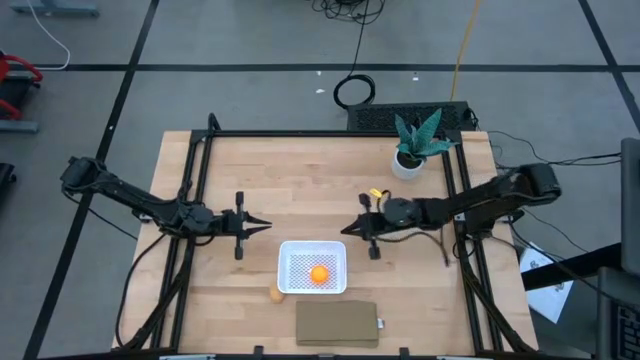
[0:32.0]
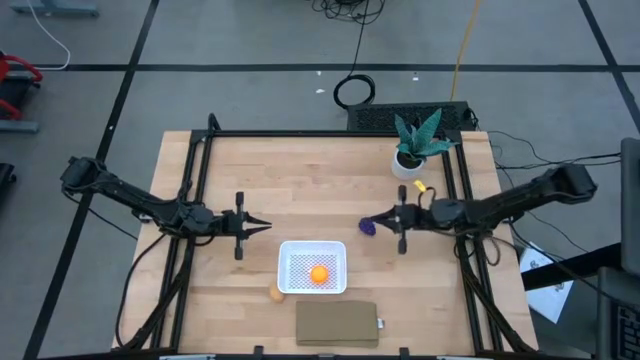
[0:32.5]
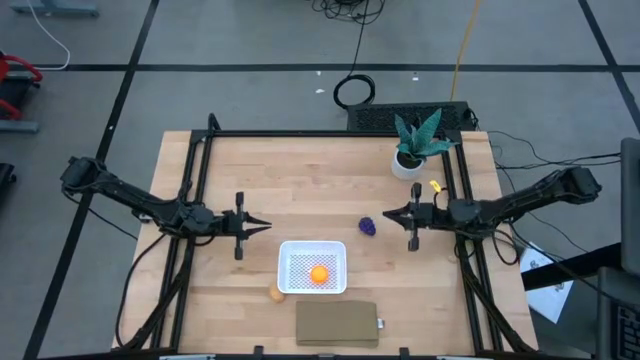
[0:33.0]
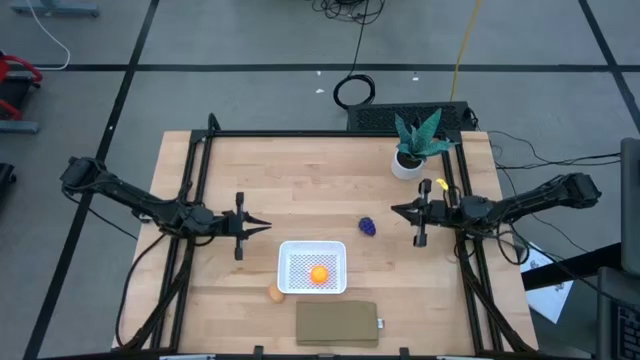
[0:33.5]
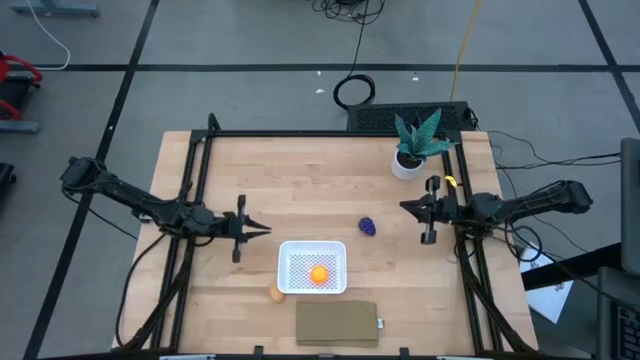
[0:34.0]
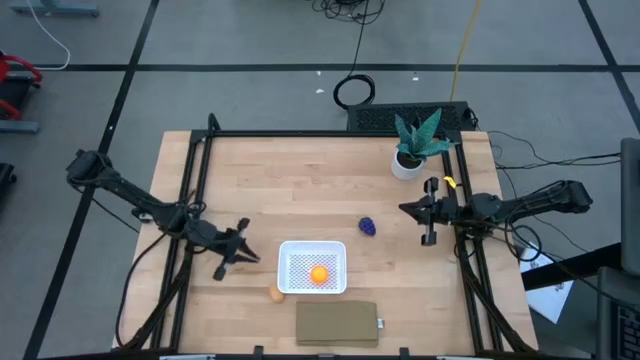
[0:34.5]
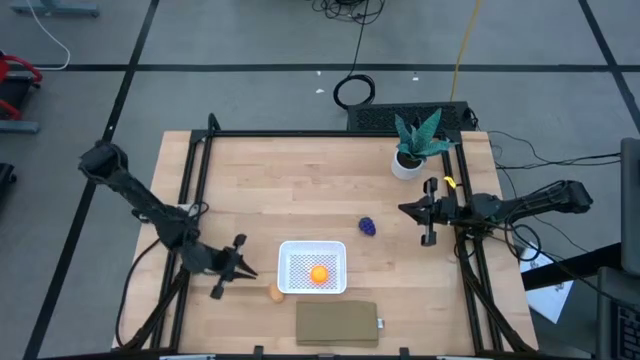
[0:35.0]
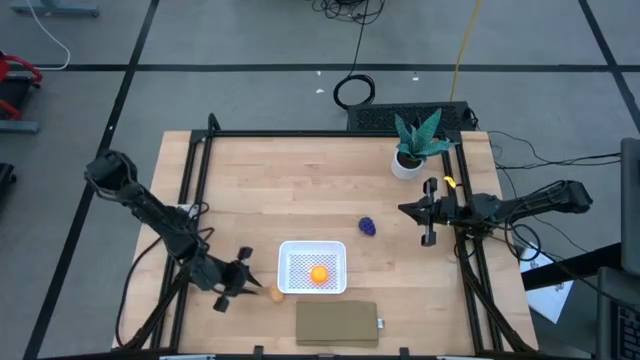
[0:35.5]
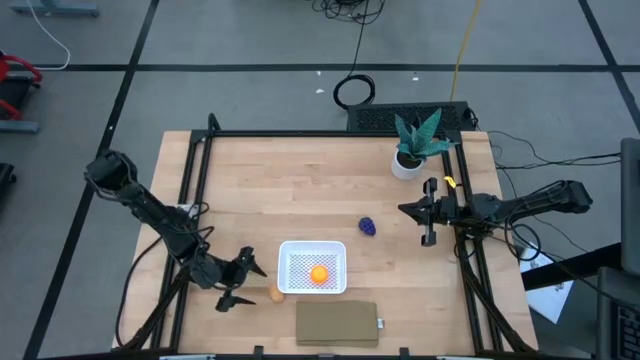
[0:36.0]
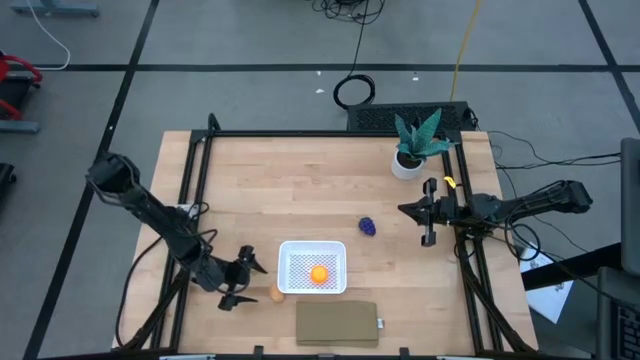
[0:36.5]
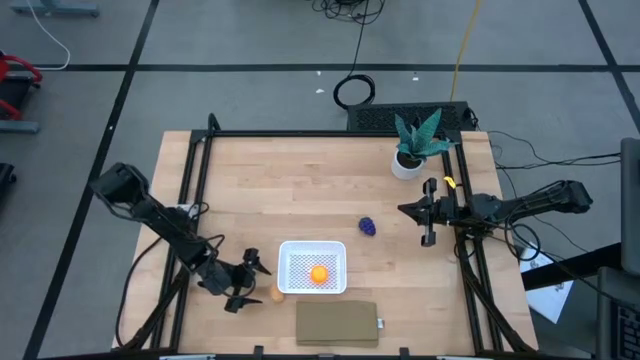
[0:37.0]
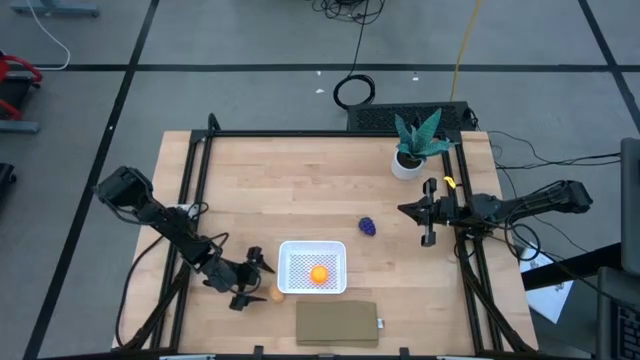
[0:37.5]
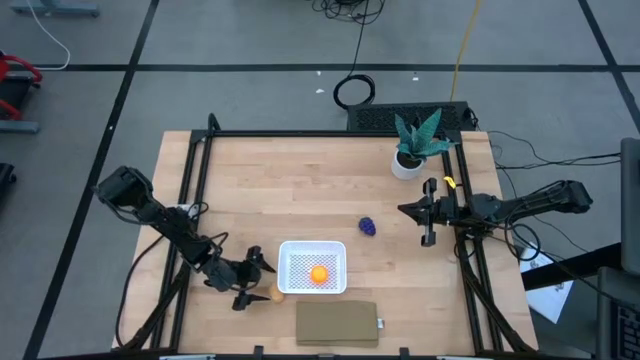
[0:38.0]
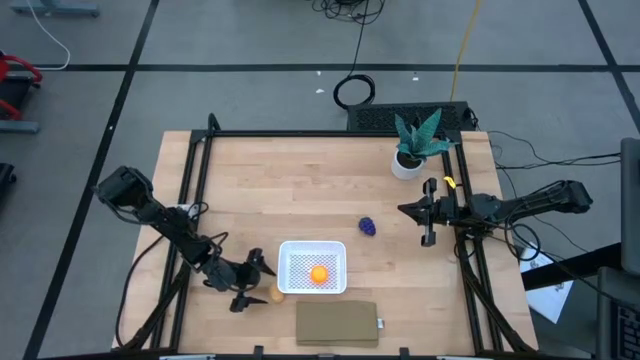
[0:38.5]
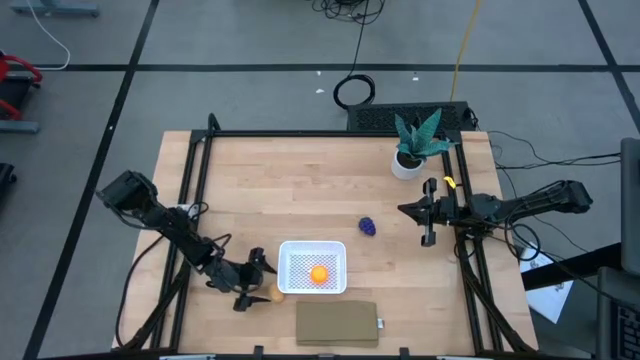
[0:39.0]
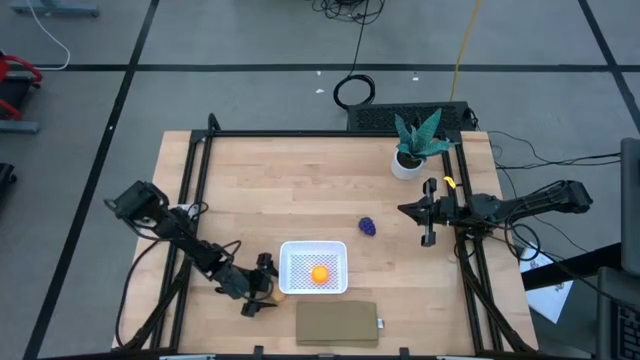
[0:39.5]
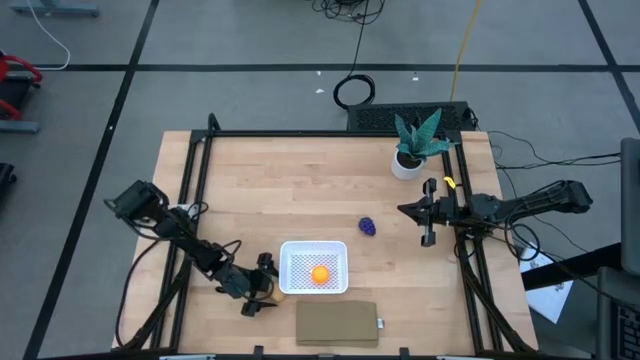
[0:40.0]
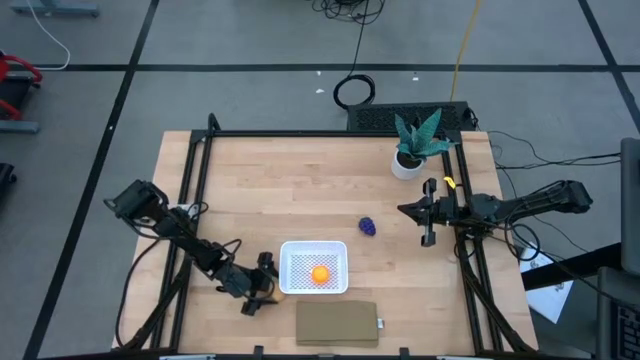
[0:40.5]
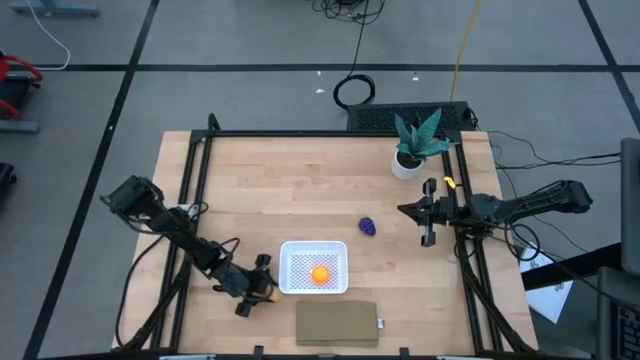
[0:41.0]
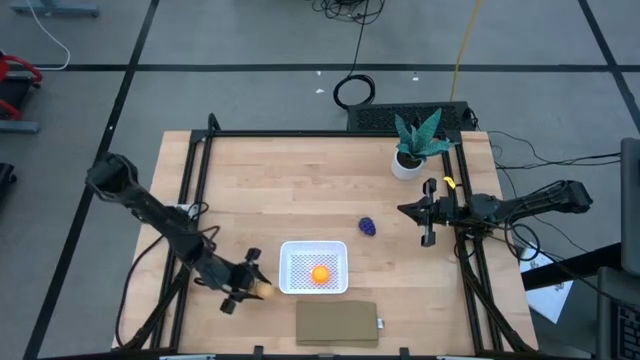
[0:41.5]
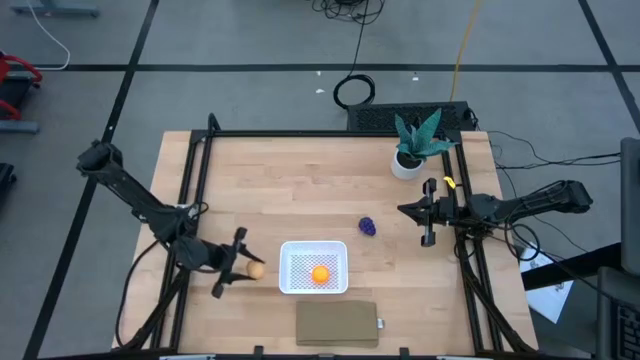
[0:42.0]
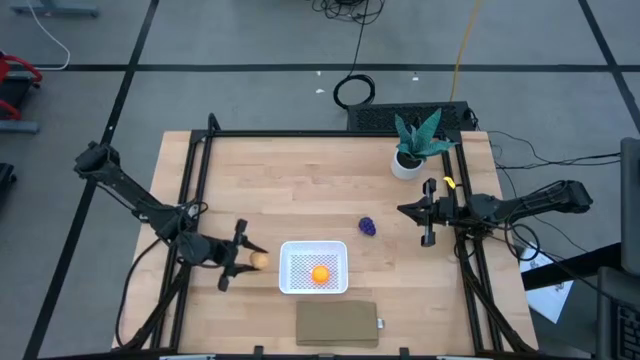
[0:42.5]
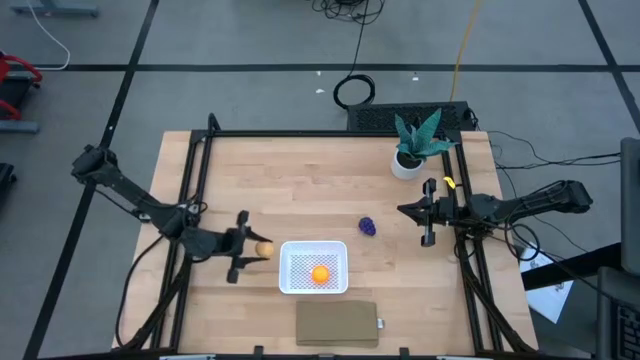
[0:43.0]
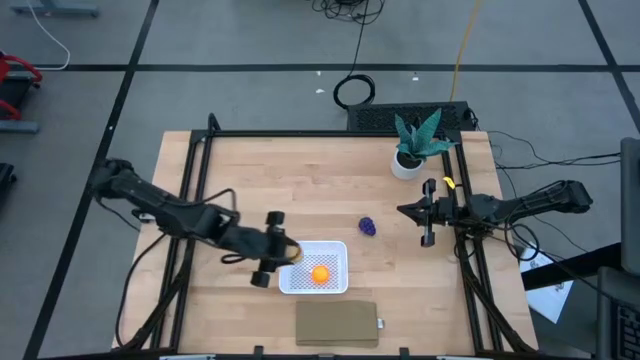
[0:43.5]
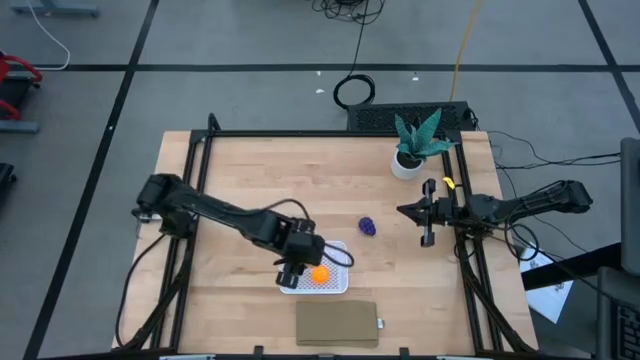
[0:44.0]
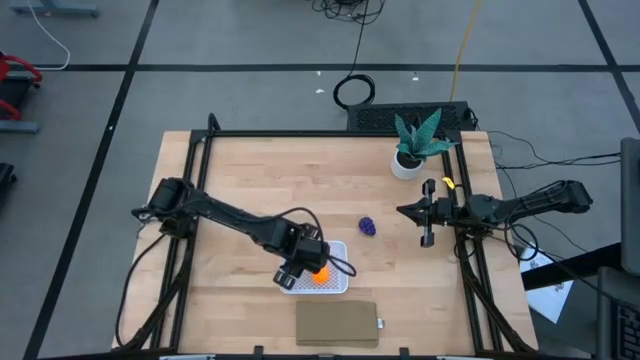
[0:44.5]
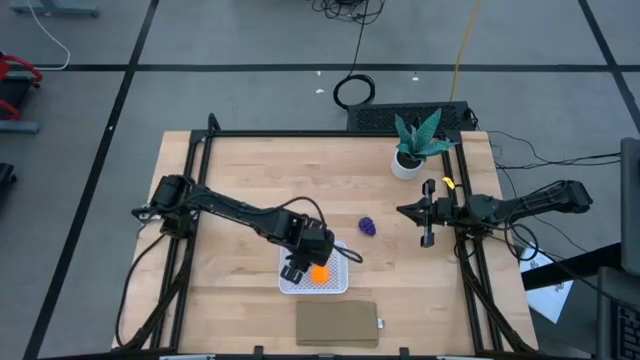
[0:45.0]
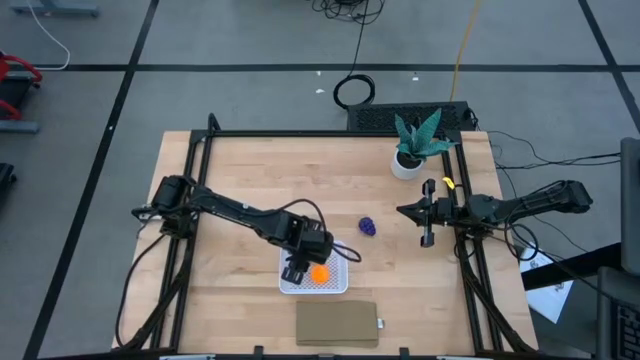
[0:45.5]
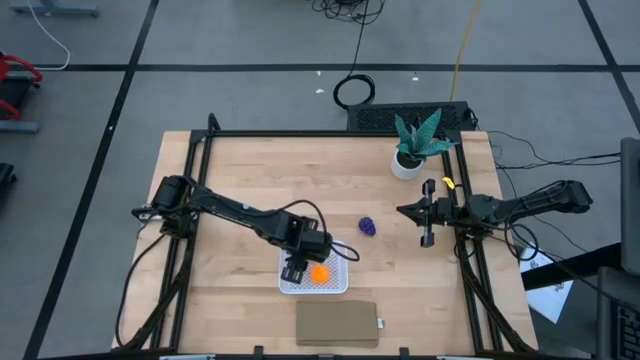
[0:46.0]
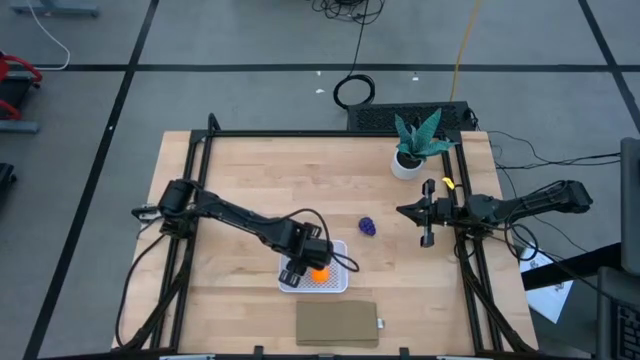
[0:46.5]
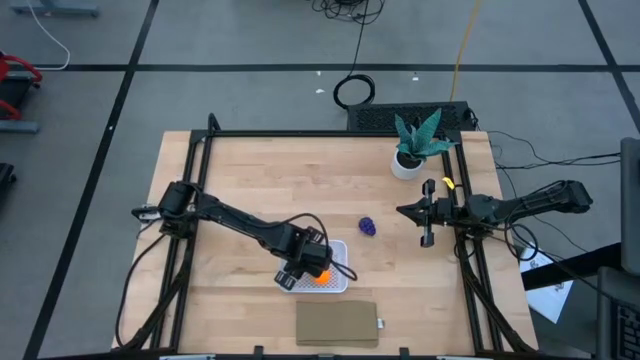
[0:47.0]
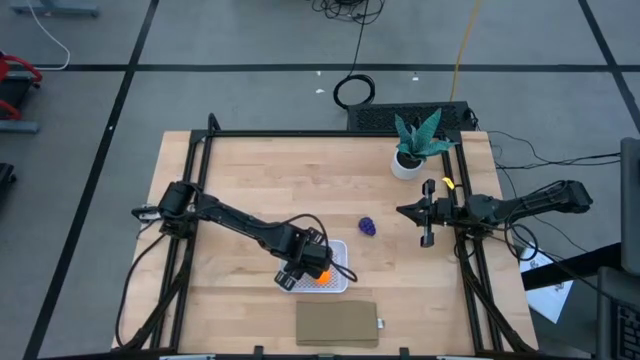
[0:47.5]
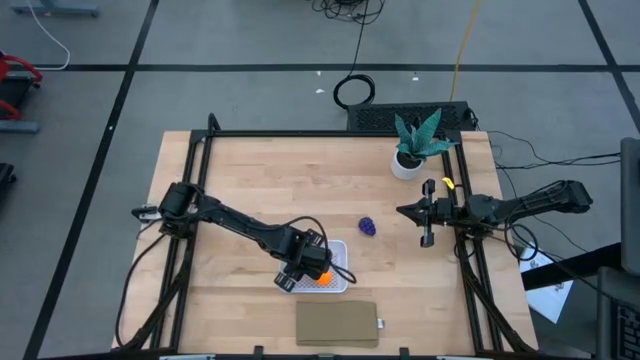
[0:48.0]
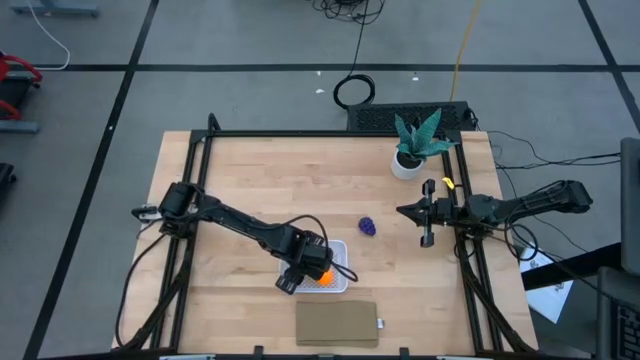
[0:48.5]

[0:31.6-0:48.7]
Task: Pick and placing Produce into tupperware
Put the potato into the basket

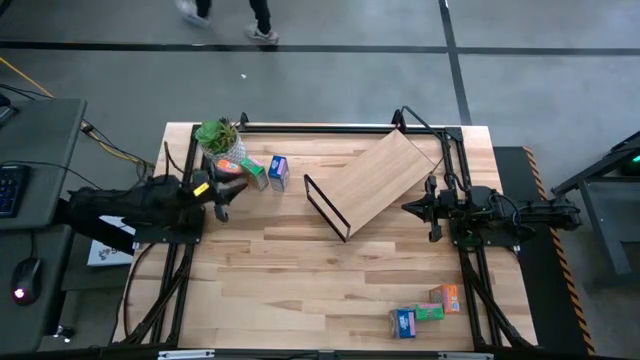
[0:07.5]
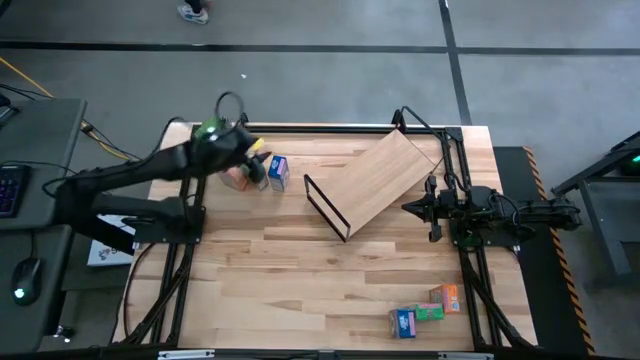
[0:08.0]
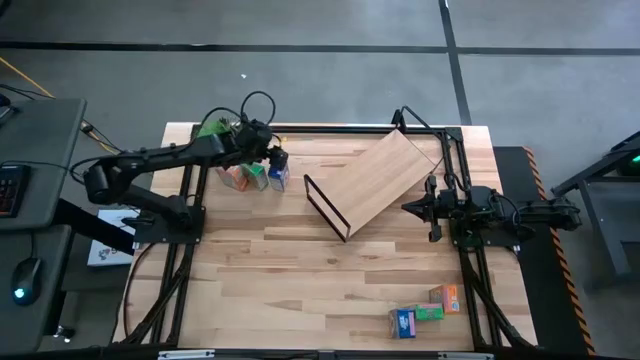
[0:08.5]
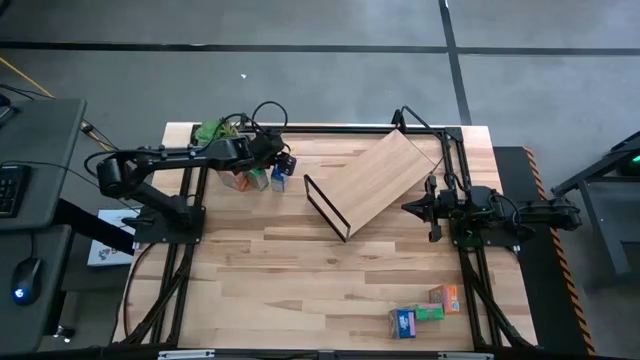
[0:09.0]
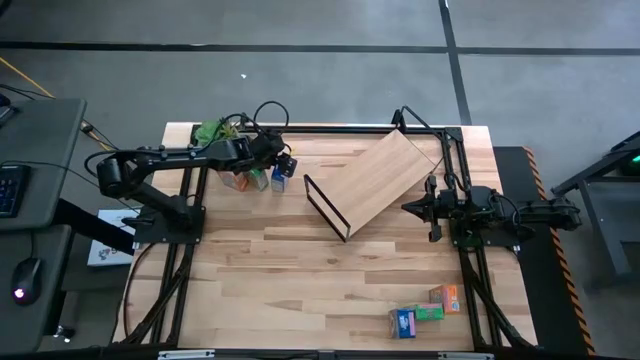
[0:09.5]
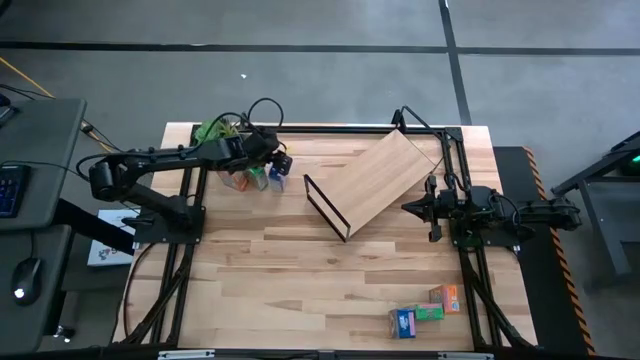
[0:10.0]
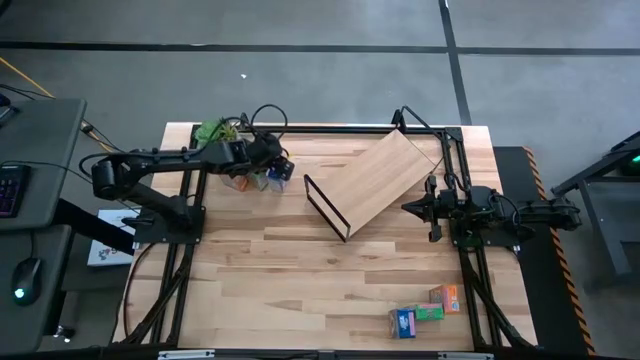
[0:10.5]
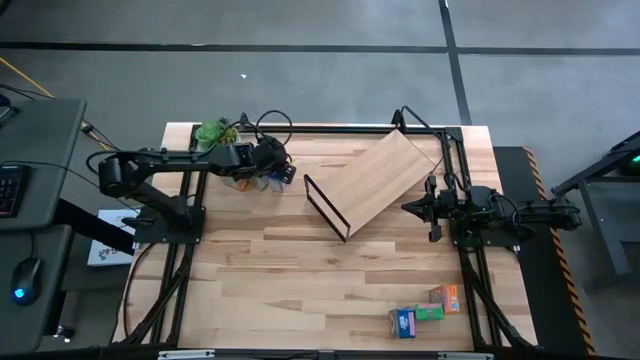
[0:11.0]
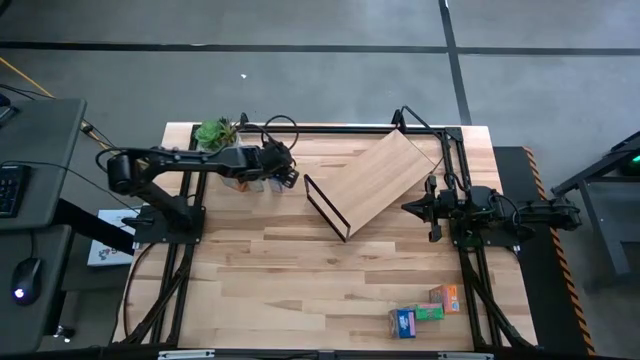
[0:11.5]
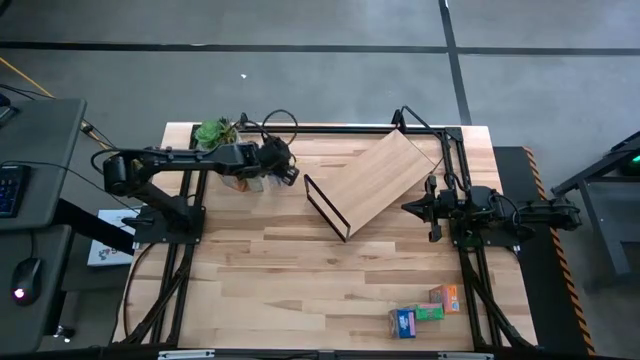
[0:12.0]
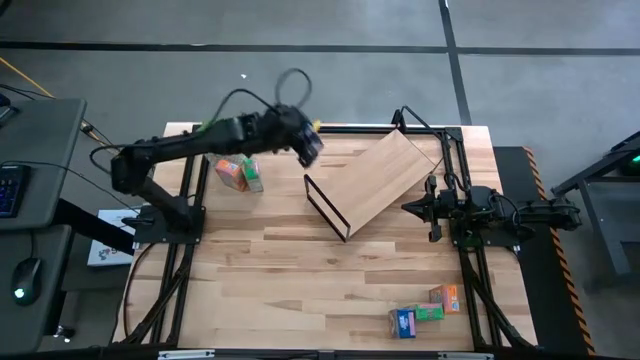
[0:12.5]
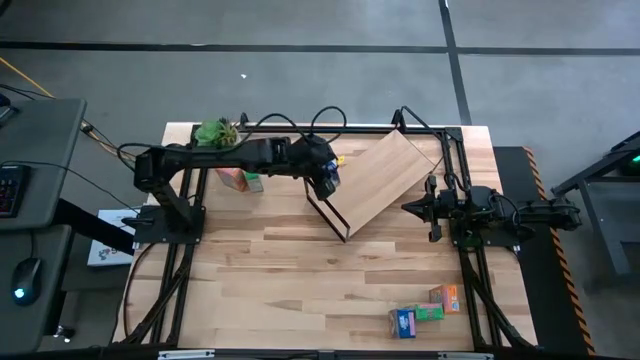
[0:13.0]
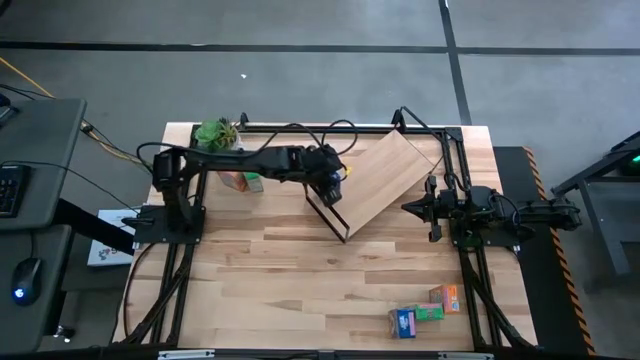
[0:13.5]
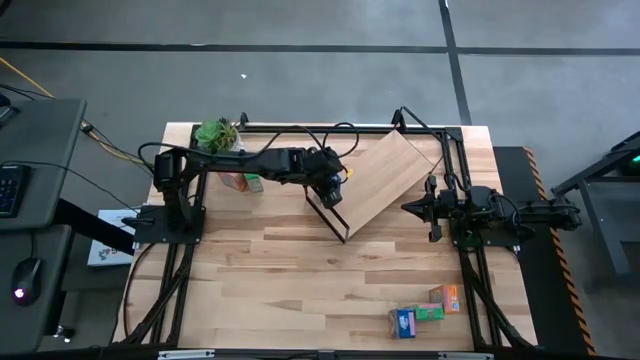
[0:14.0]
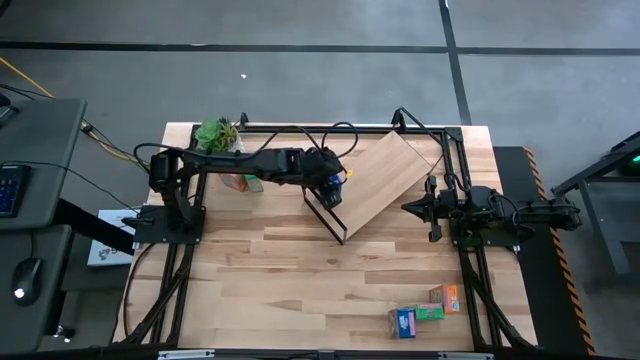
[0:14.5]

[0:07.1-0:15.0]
Task: Stack cereal on shelf
Put the top blue cereal box on the shelf
